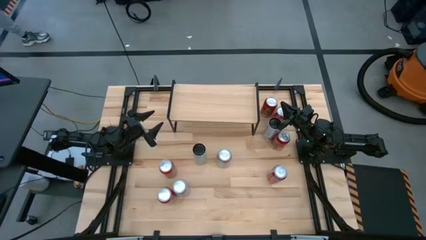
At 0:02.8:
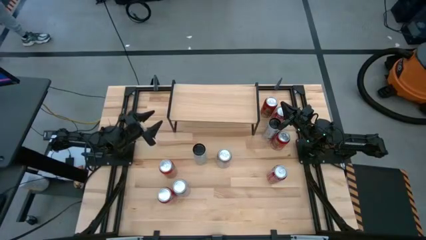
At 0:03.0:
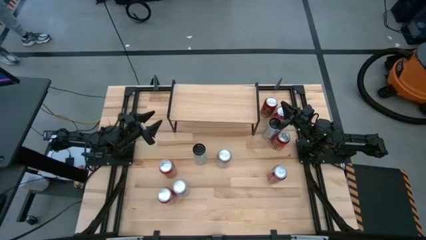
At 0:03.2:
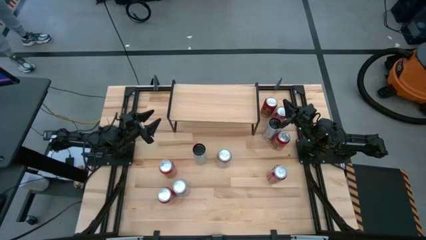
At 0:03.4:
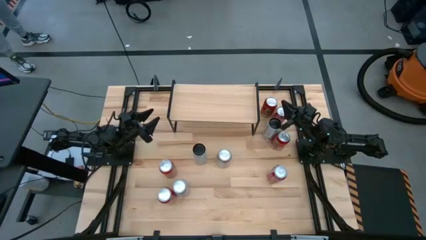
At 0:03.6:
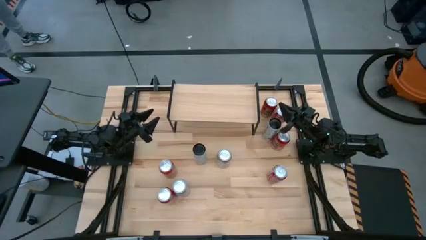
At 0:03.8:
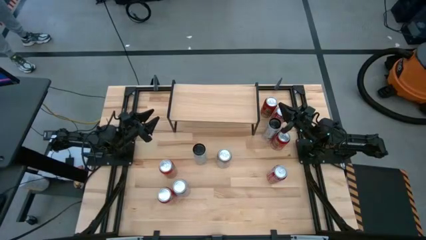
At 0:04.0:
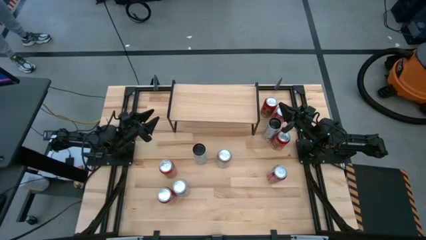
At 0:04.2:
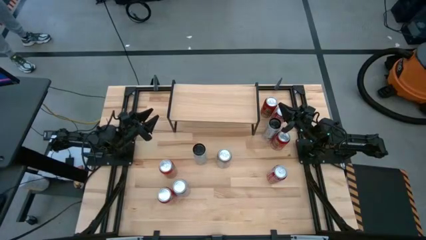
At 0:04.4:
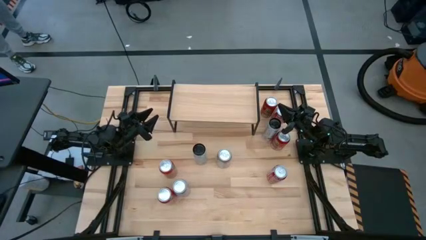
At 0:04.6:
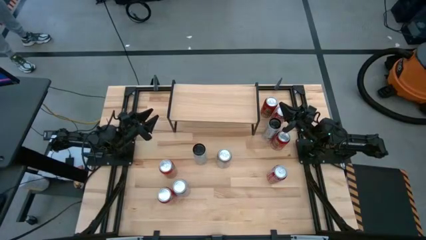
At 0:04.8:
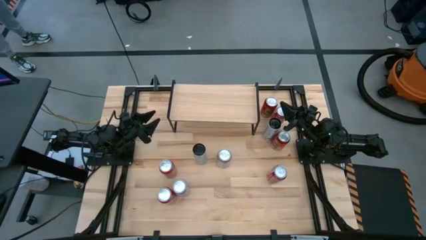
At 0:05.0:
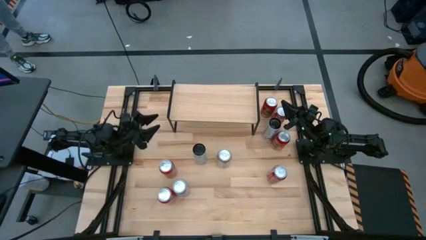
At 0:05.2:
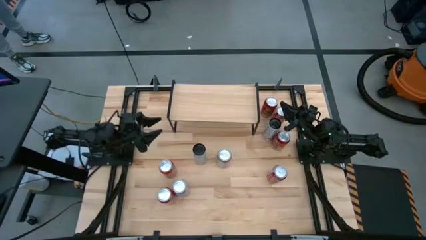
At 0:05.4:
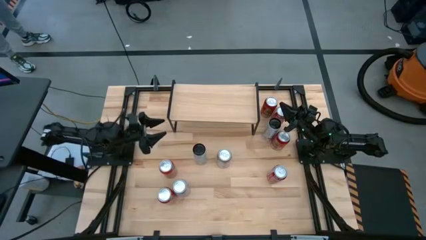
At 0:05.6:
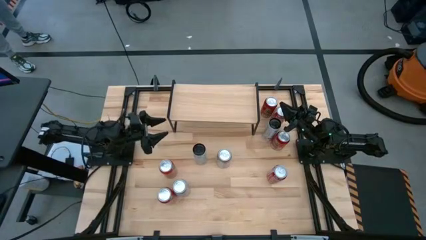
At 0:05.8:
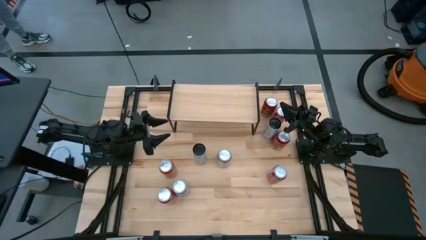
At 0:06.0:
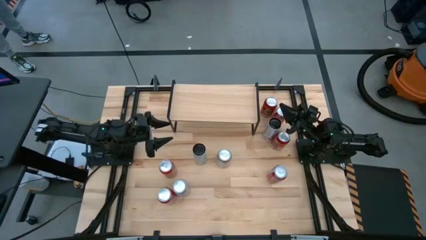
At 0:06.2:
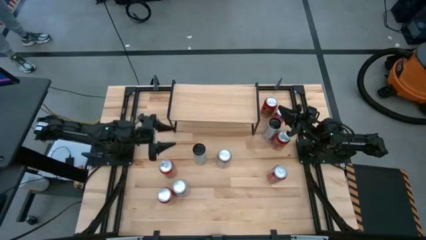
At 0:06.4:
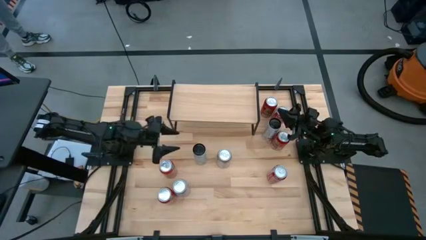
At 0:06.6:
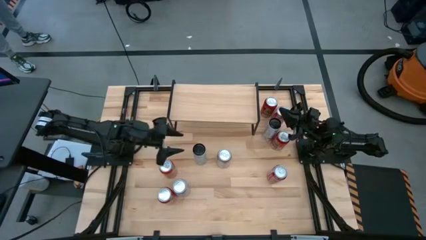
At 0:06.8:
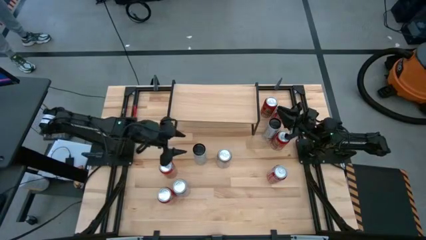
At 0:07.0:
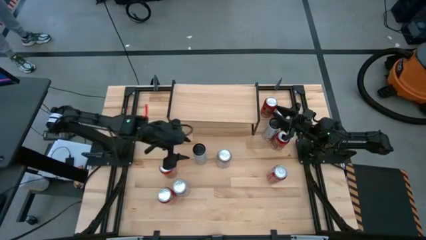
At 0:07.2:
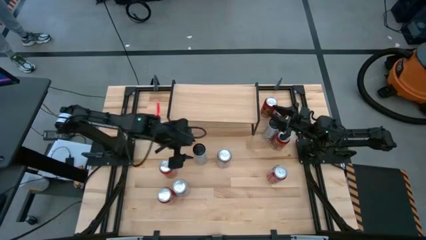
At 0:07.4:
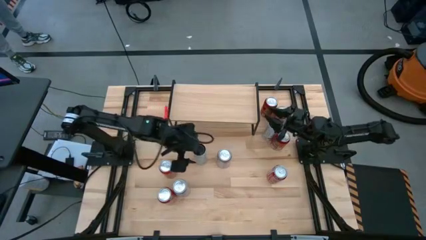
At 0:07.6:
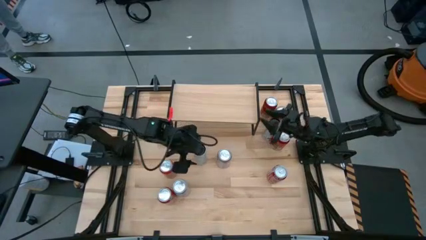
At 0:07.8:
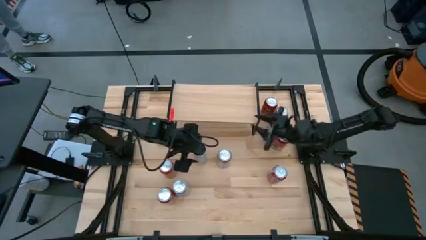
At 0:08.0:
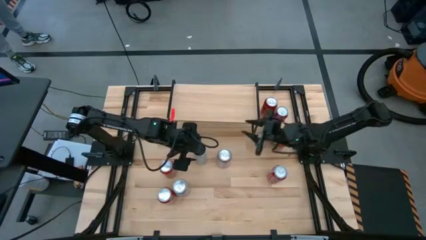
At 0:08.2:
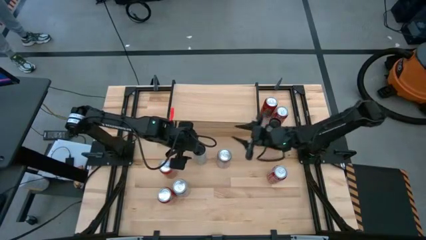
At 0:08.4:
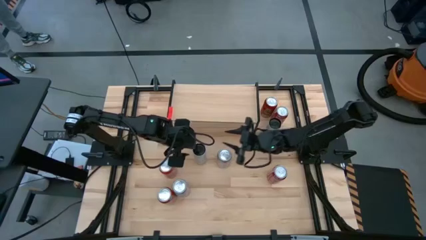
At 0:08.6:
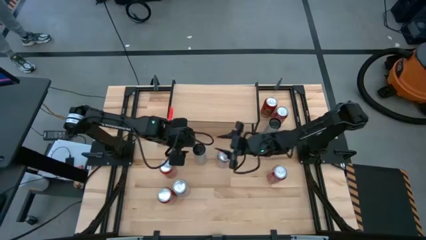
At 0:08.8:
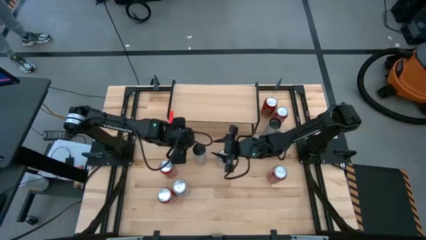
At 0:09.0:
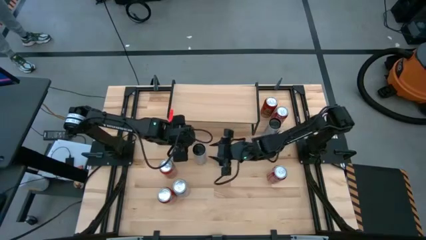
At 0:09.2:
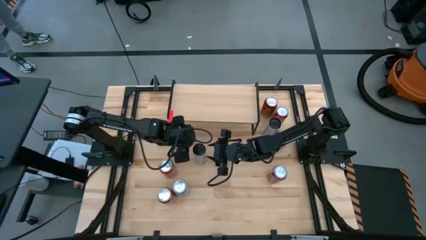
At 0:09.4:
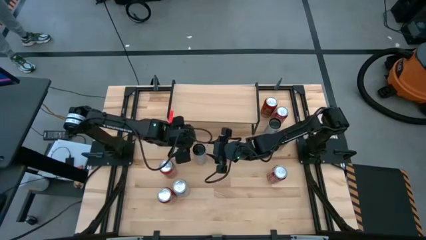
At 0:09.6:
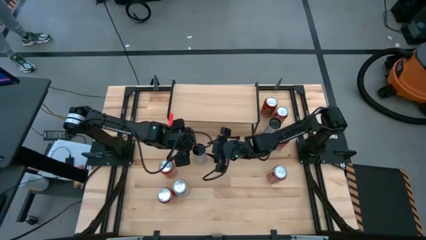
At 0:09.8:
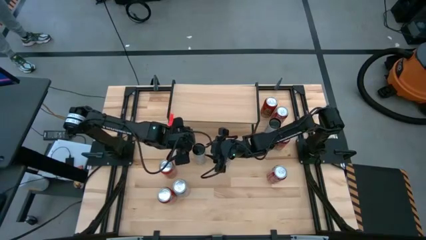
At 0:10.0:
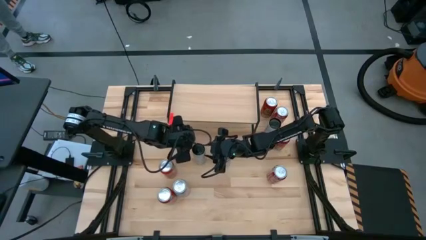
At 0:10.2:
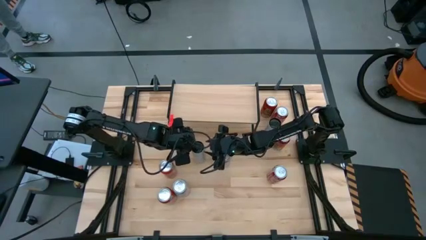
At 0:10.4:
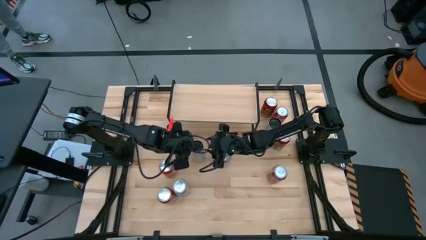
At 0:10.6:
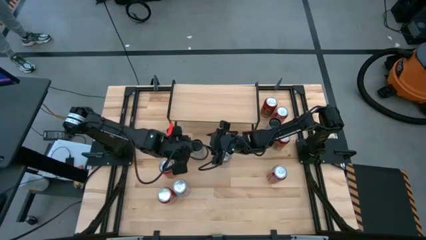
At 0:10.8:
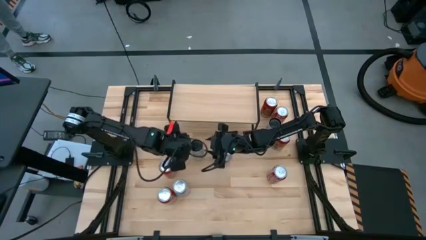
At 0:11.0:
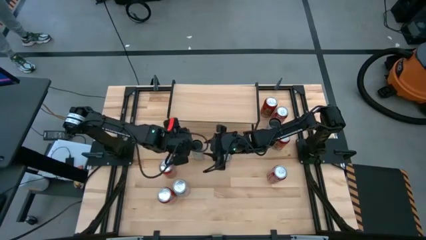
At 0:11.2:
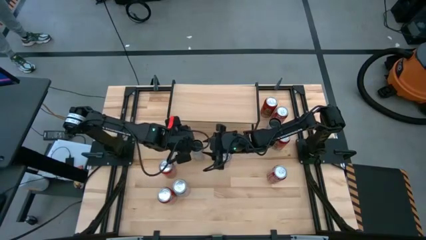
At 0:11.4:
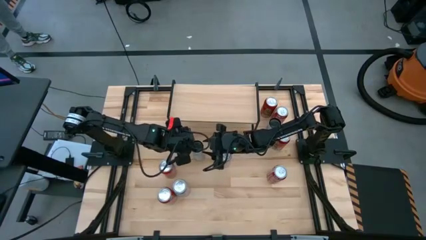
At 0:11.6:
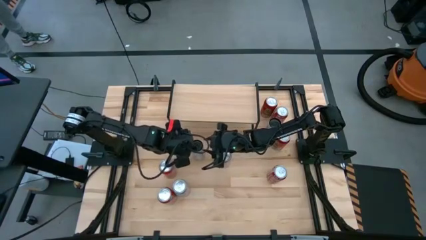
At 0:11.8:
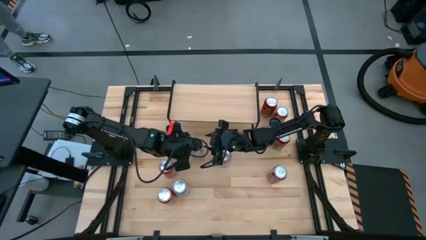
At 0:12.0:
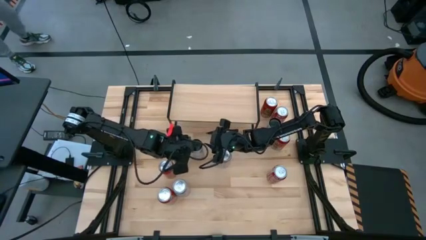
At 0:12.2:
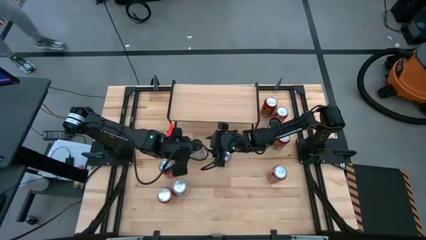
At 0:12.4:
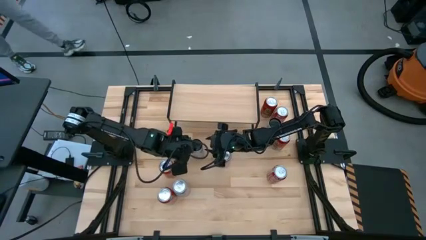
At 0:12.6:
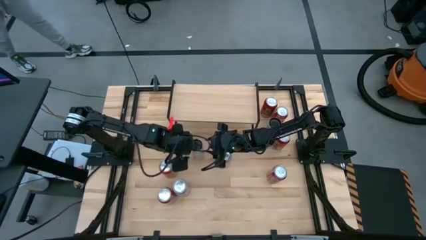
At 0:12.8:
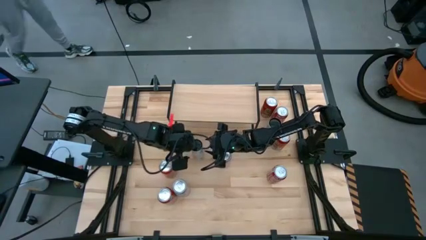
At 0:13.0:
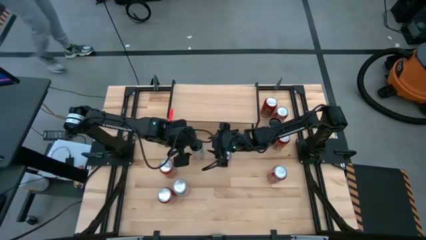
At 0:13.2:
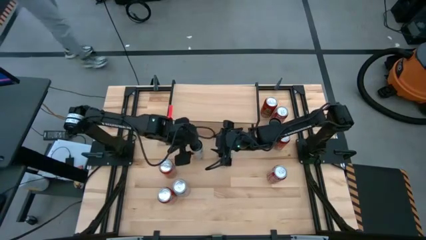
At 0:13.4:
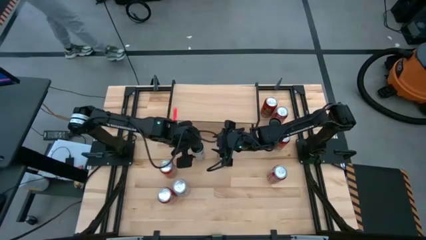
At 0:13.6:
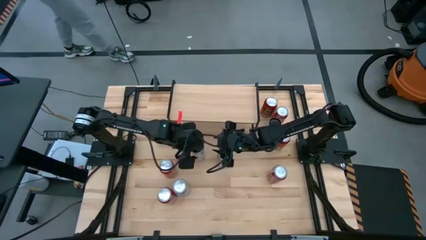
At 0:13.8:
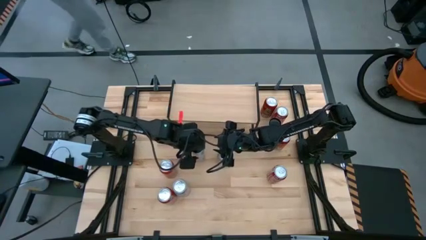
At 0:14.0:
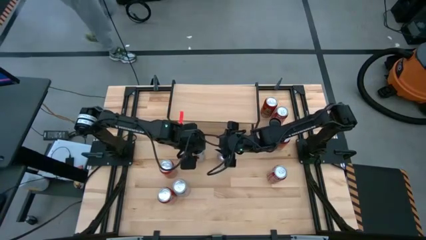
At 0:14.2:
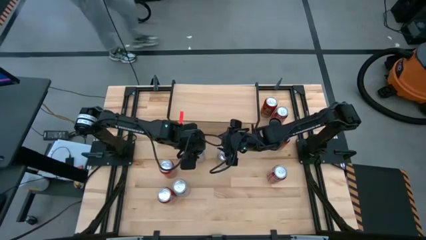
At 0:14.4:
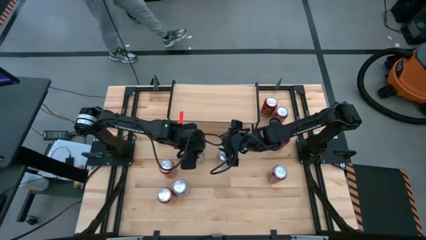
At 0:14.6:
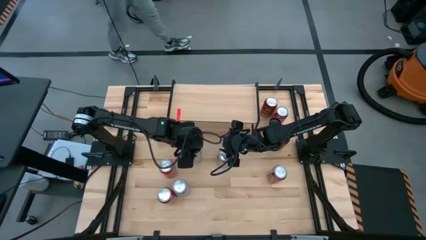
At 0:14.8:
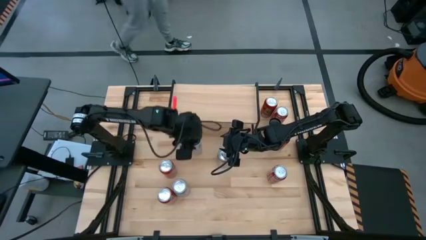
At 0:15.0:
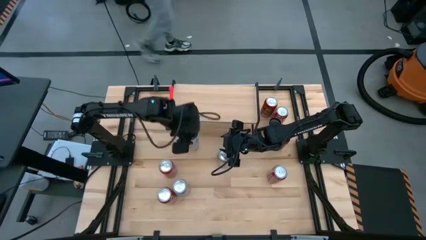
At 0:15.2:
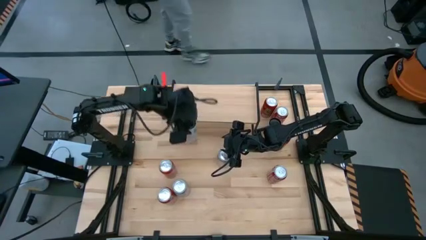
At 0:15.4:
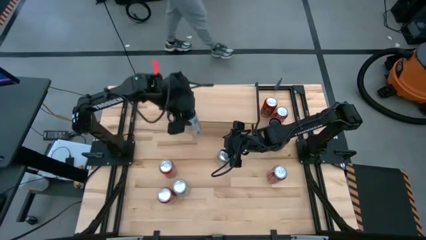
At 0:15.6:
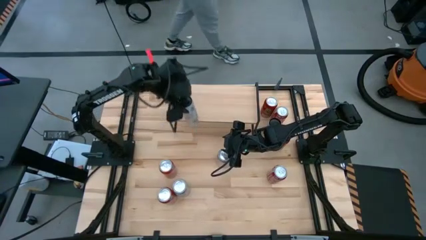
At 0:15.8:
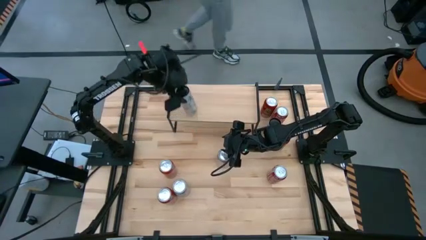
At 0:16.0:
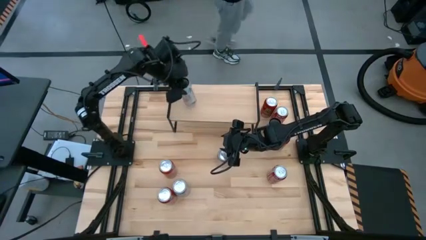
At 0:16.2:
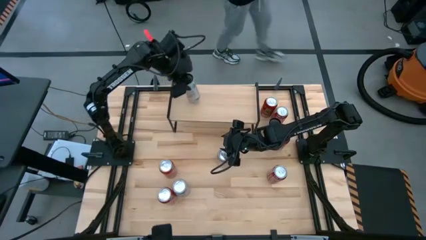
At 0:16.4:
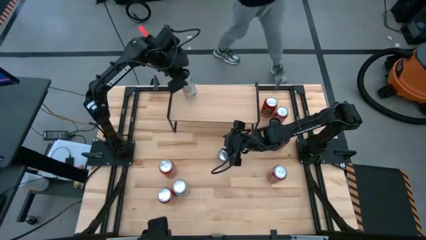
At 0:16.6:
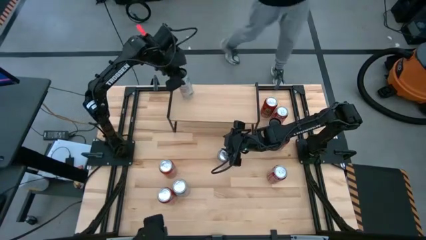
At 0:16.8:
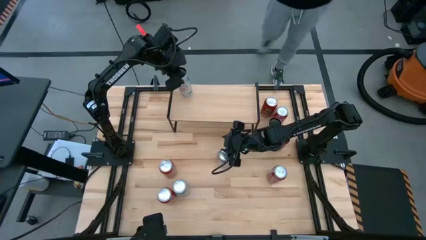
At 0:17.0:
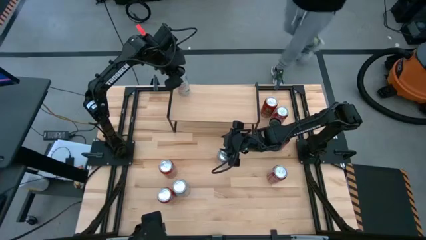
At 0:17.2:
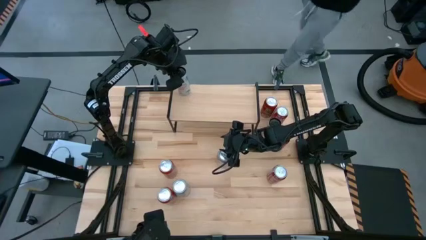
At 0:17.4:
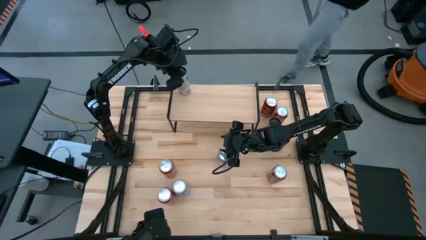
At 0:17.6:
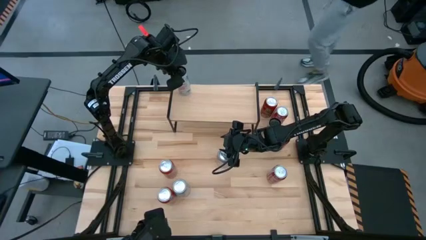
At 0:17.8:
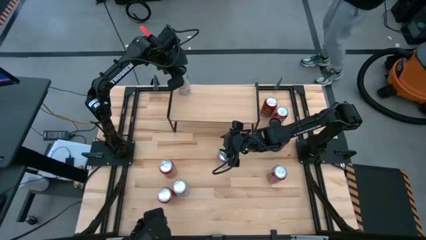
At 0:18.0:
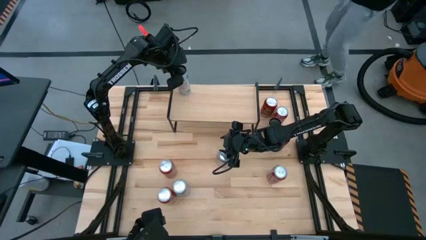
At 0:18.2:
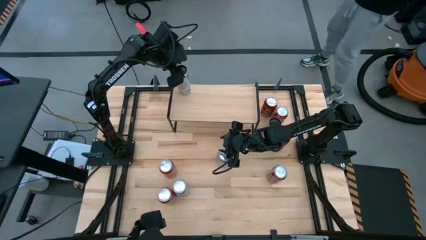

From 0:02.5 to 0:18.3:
Task: Place canned beverage on shelf
Put the left white soda can on the shelf
